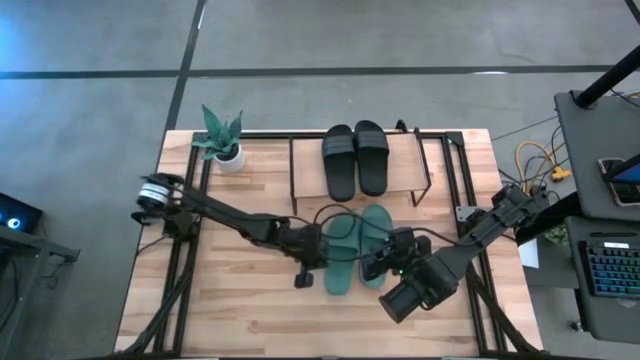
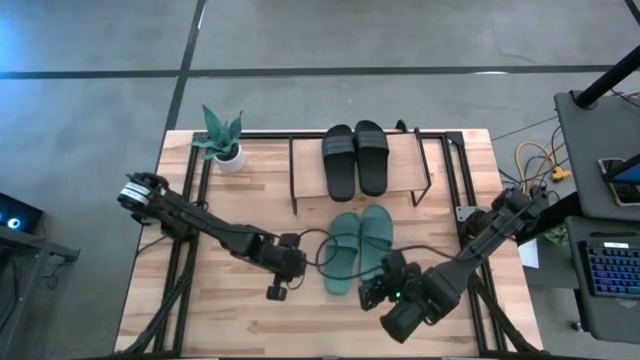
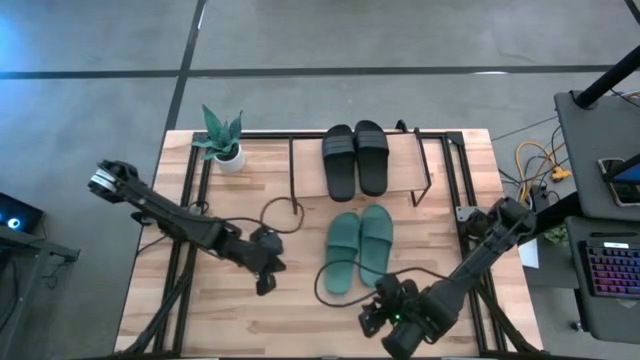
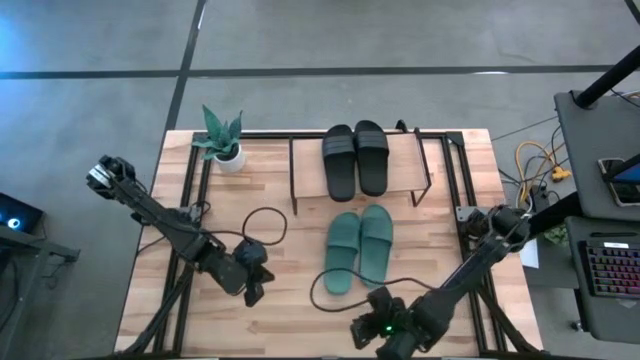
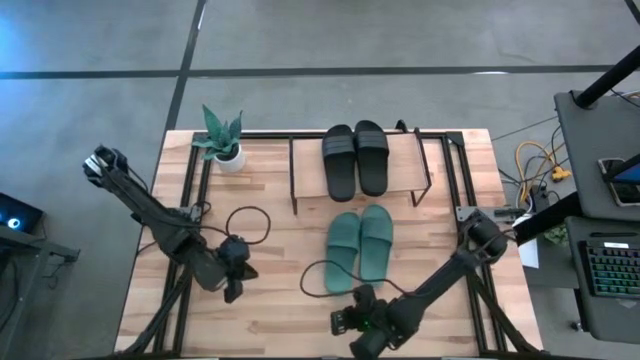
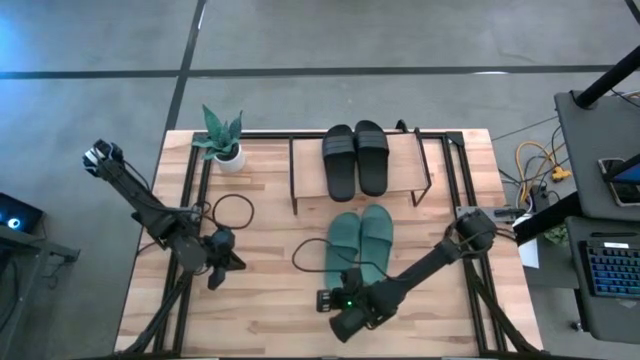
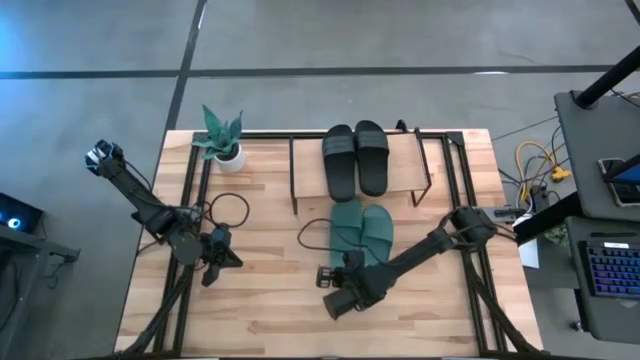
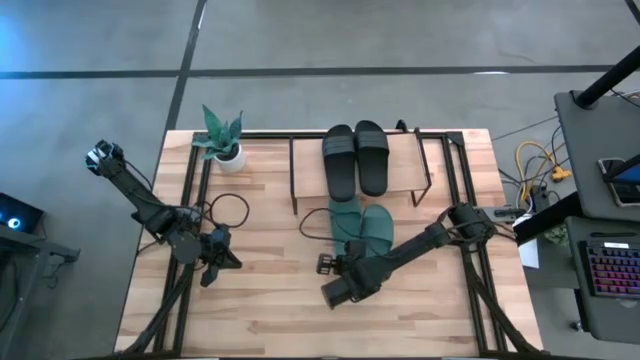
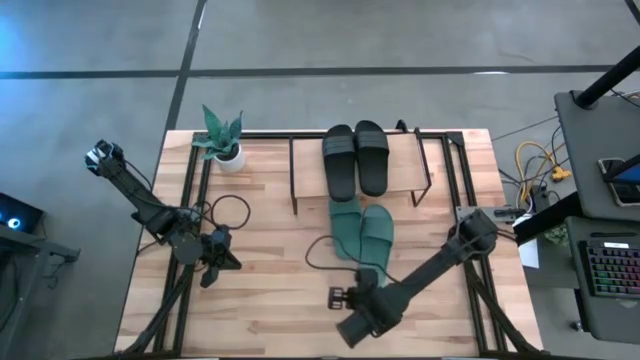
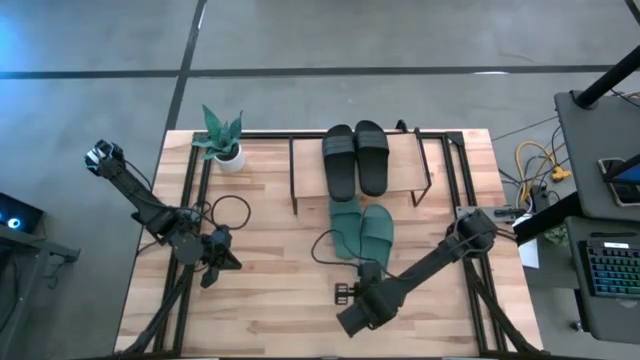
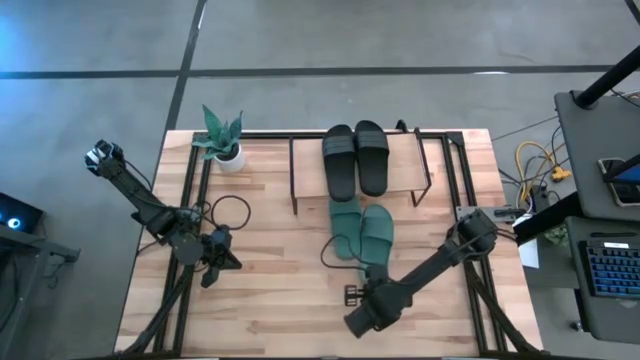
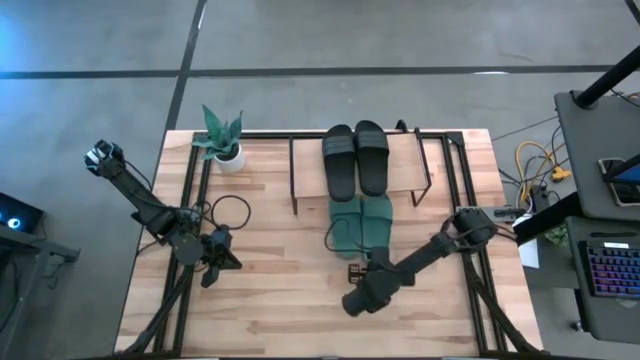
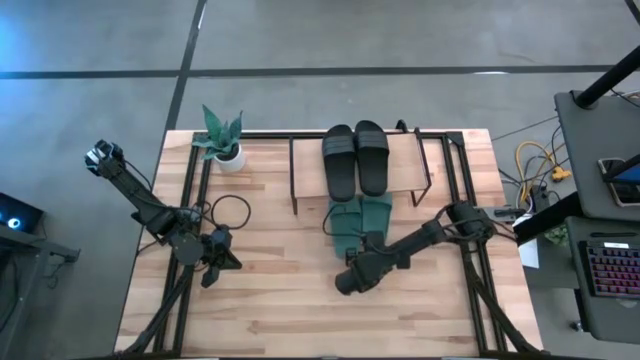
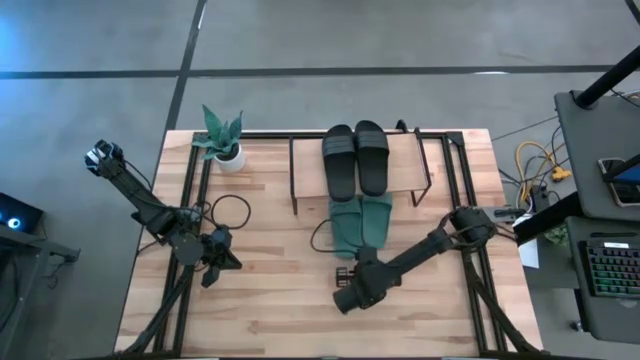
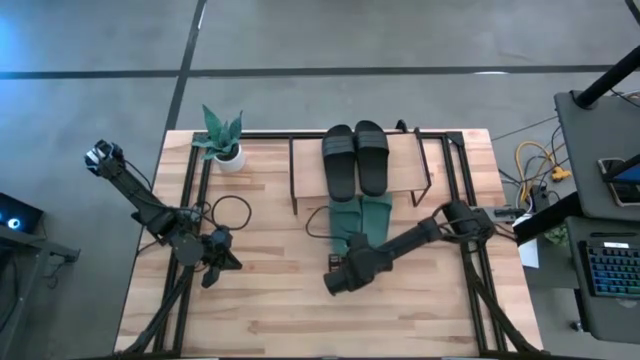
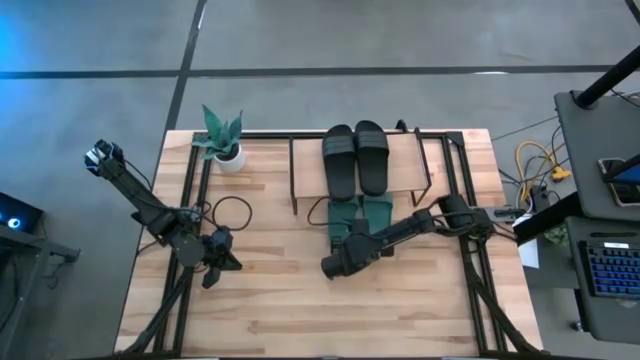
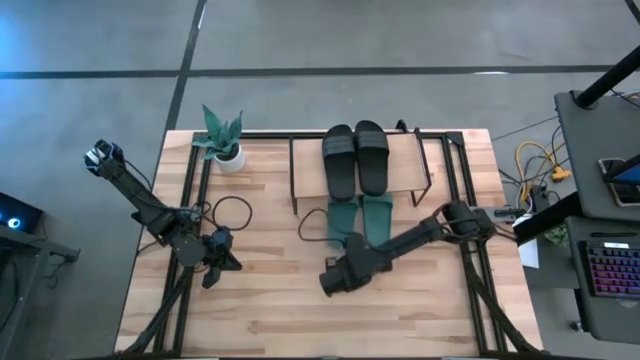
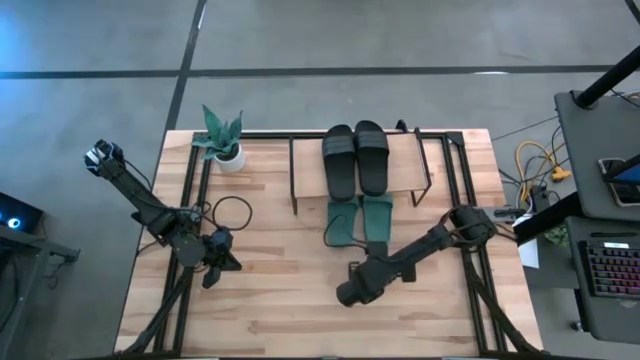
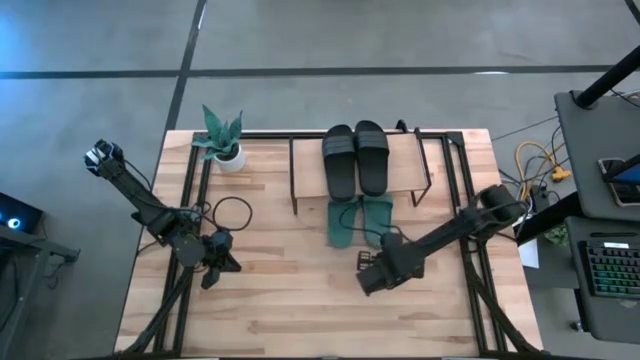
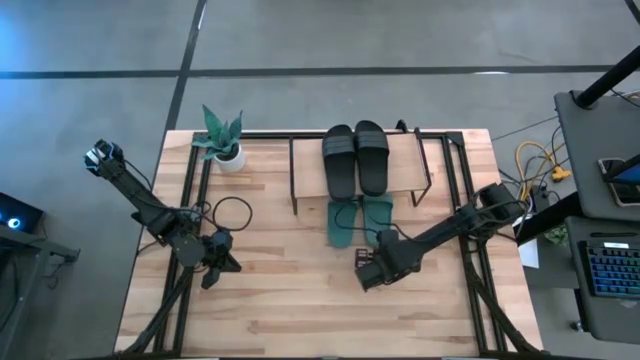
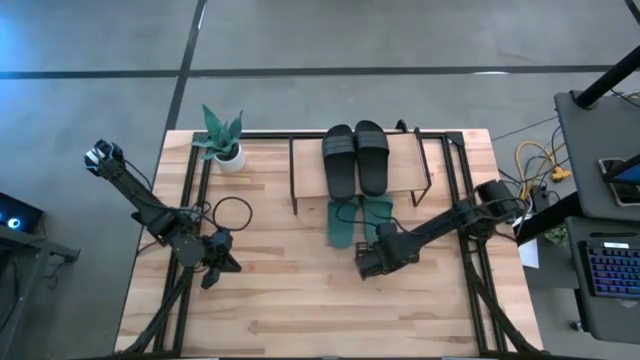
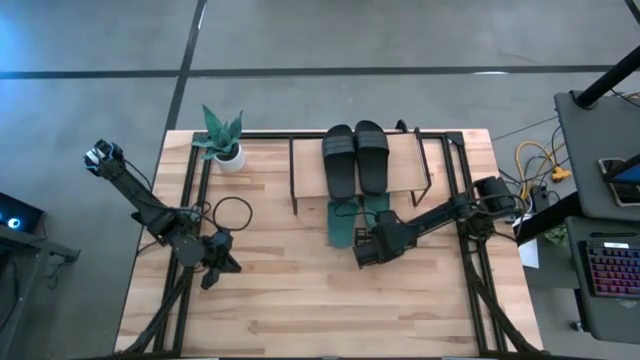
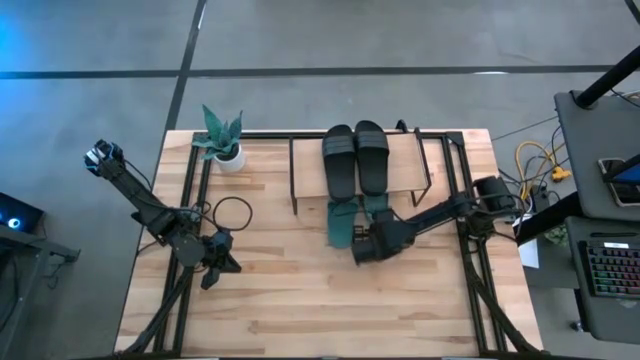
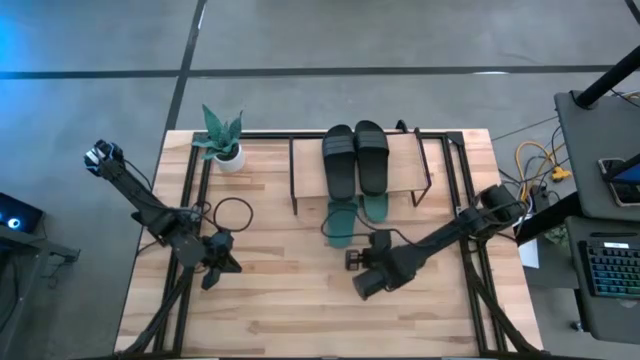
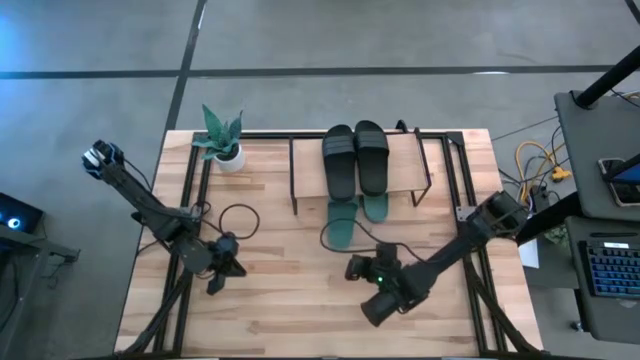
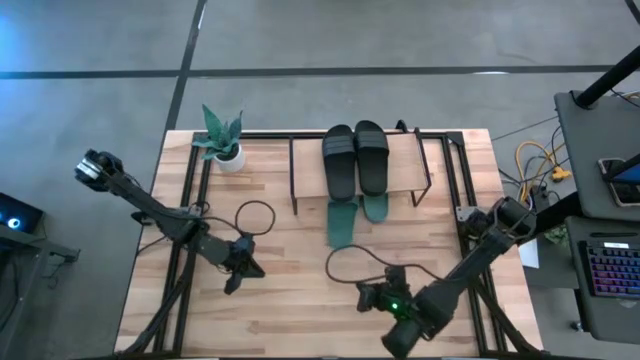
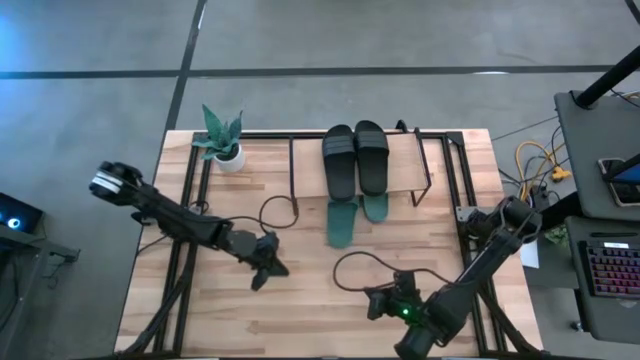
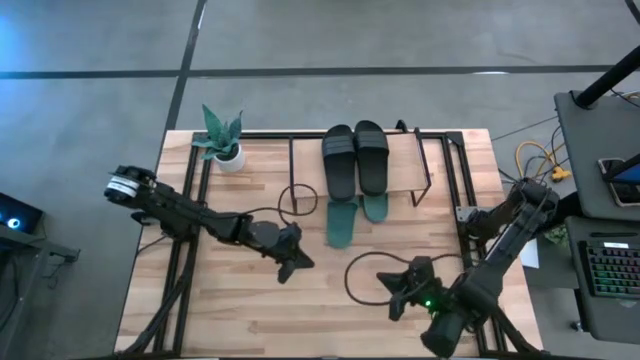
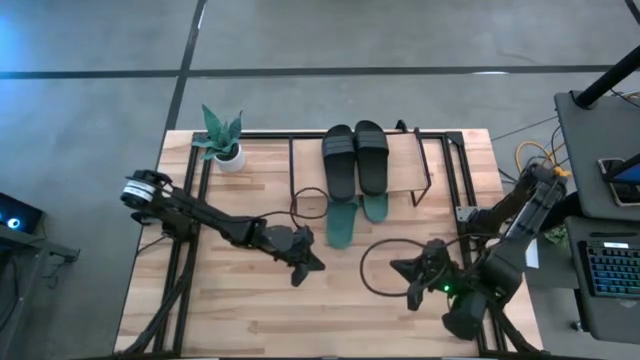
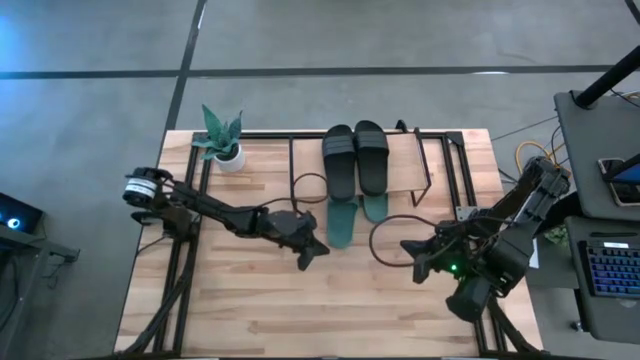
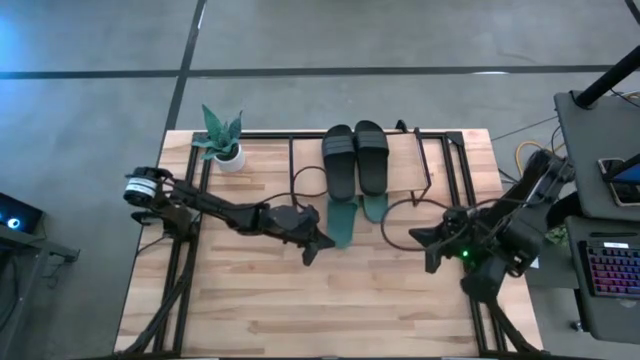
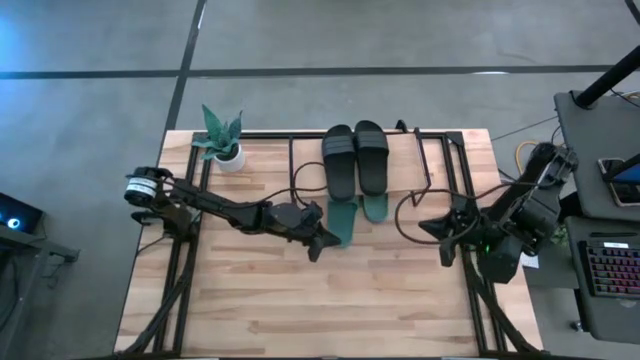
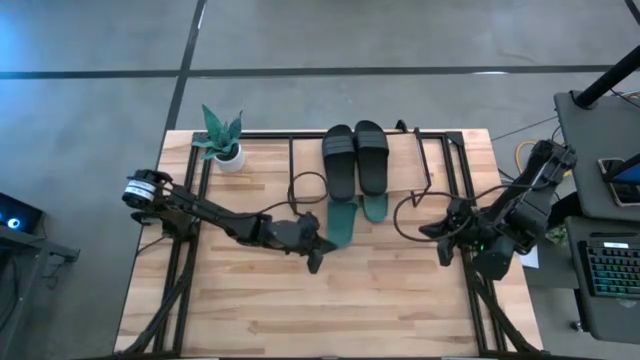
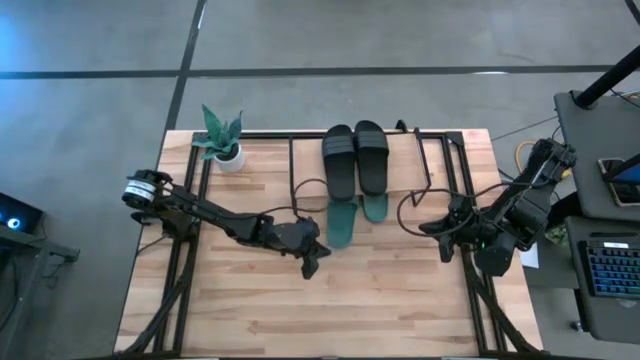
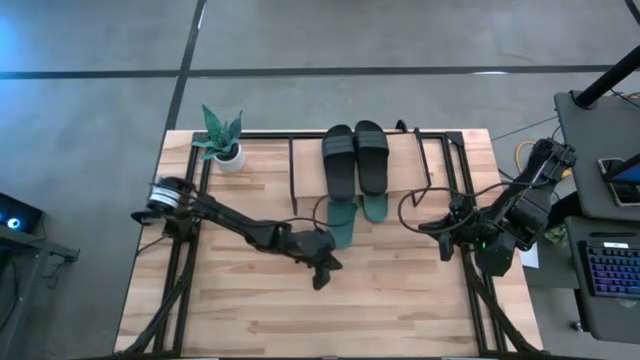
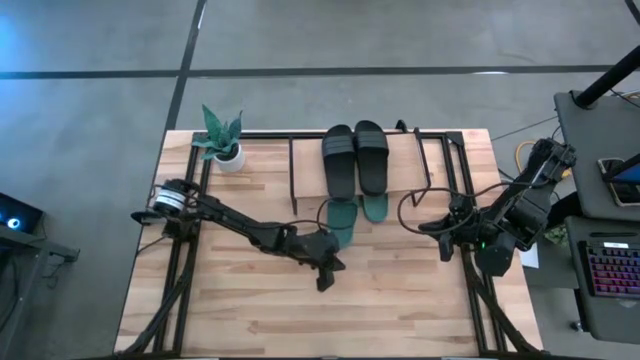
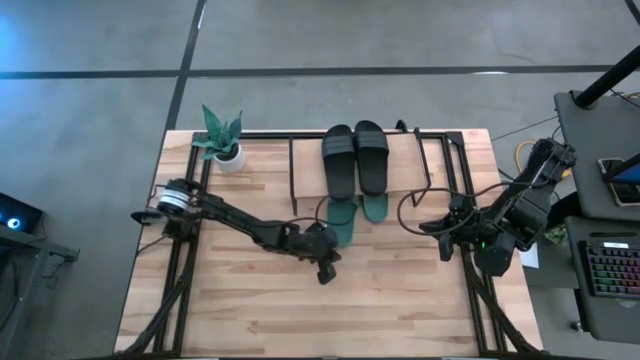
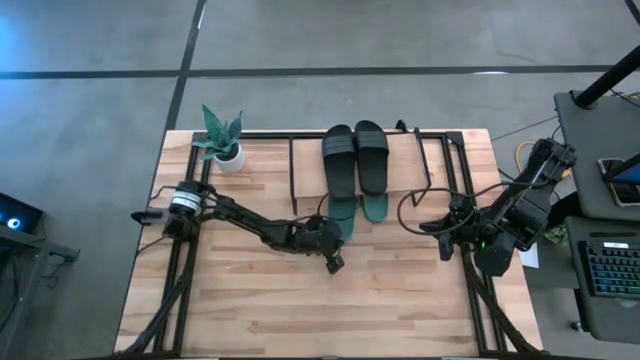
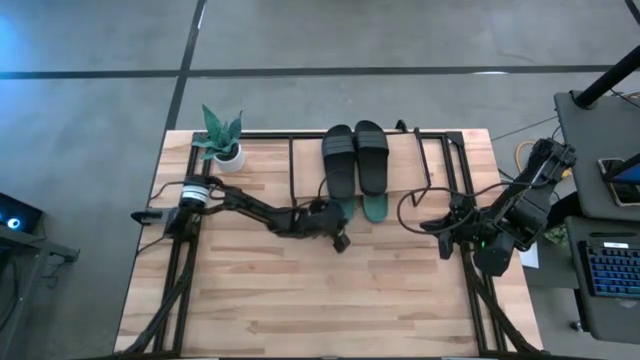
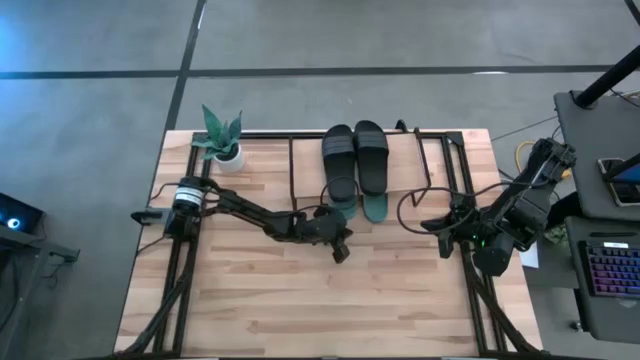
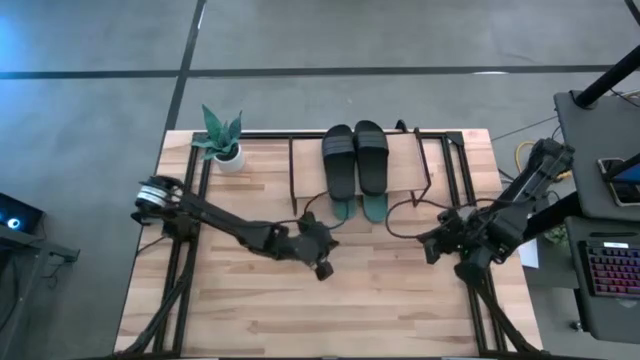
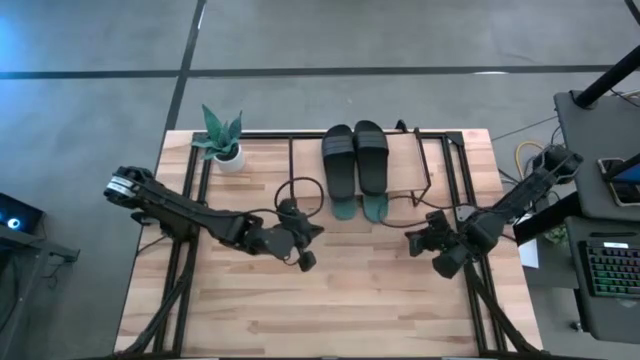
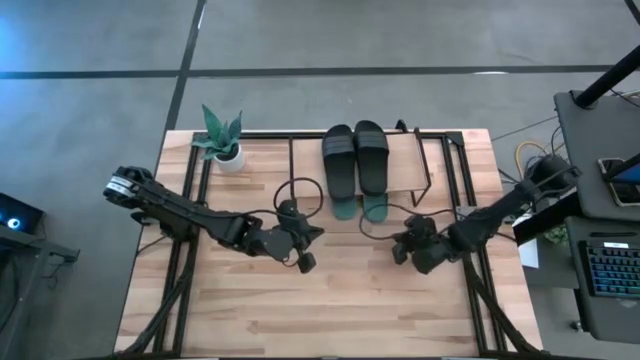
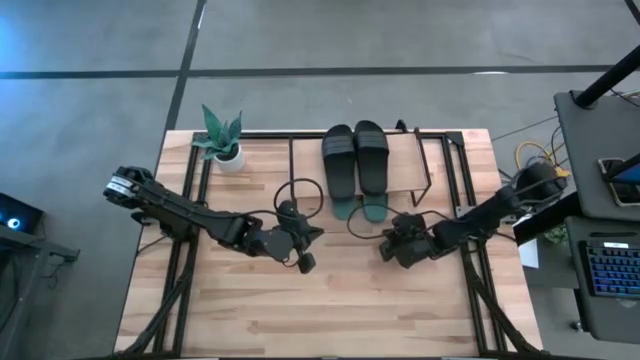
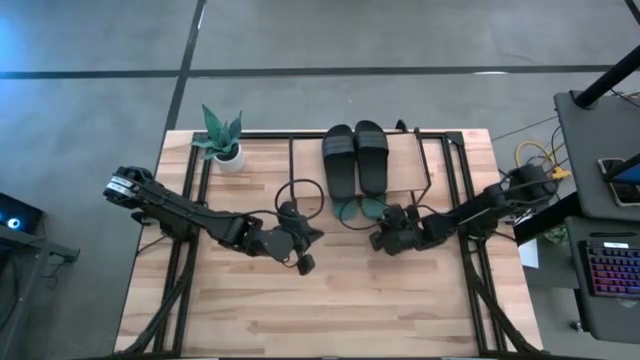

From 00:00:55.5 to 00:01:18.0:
Task: Pick and place slides into the shelf
Put the green slides under the shelf
